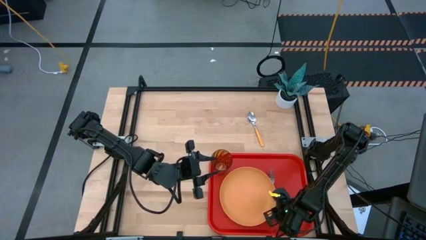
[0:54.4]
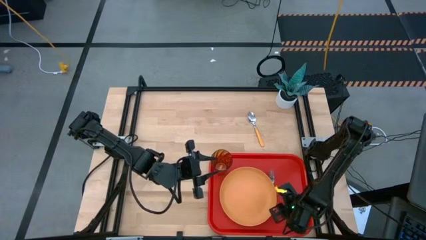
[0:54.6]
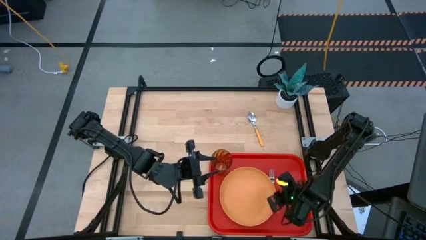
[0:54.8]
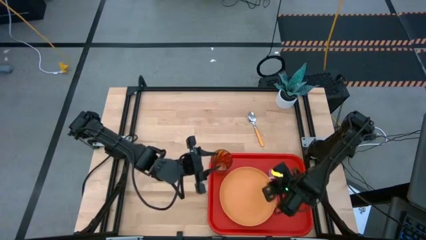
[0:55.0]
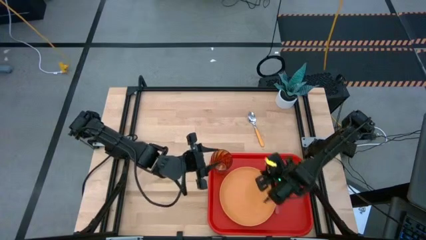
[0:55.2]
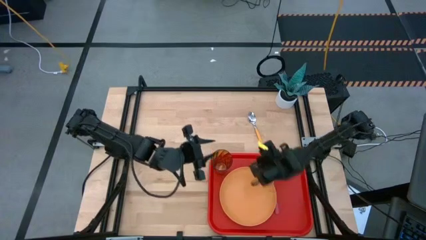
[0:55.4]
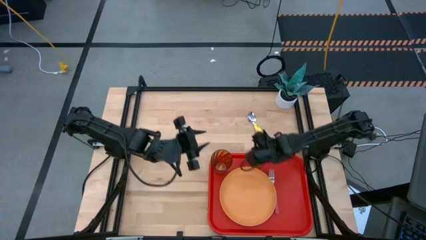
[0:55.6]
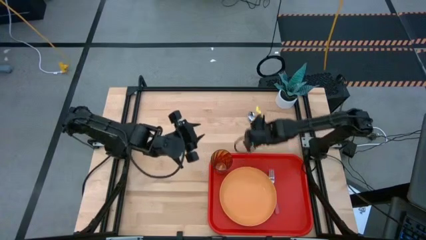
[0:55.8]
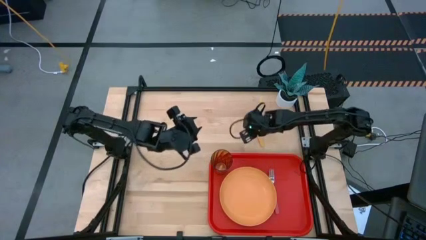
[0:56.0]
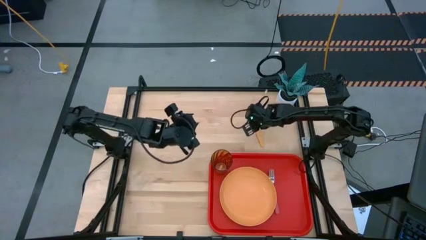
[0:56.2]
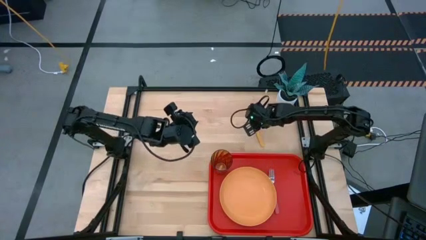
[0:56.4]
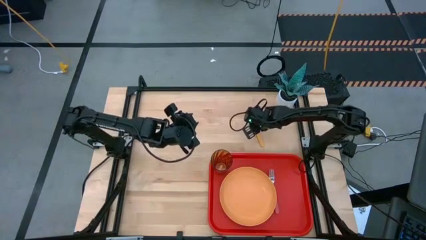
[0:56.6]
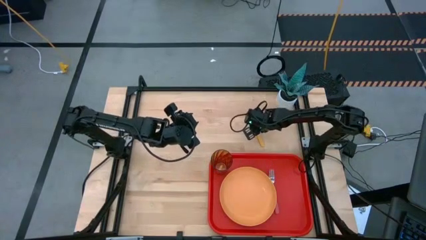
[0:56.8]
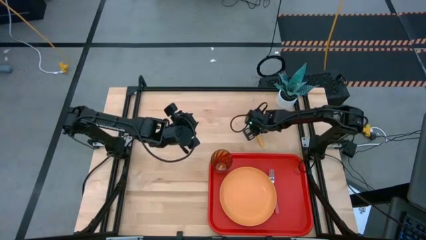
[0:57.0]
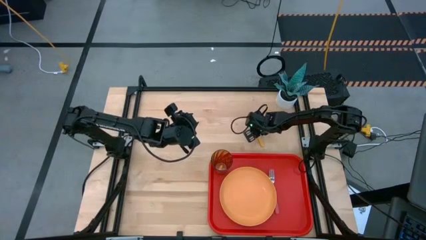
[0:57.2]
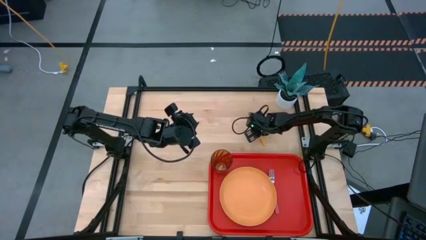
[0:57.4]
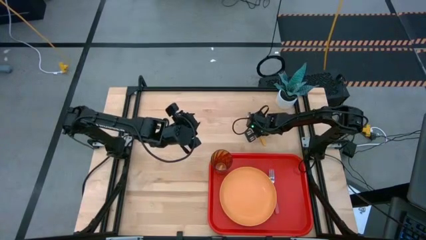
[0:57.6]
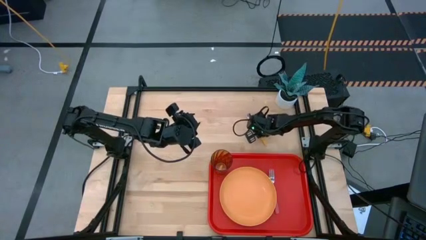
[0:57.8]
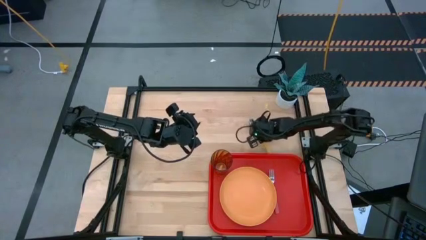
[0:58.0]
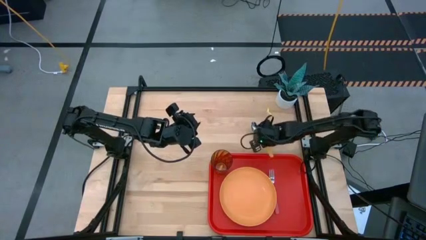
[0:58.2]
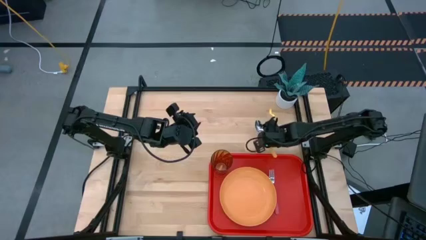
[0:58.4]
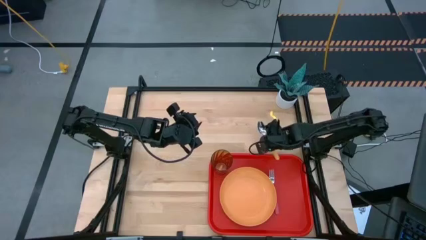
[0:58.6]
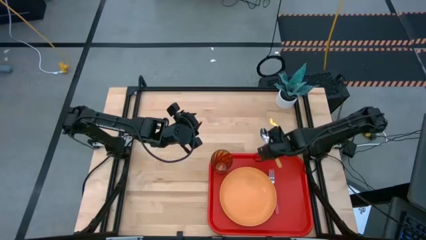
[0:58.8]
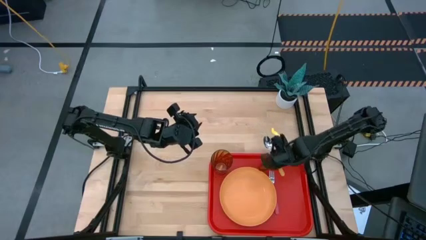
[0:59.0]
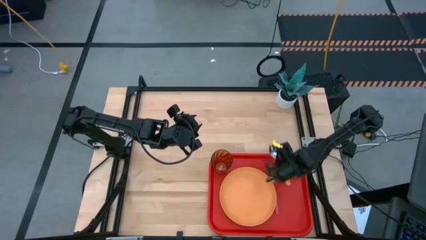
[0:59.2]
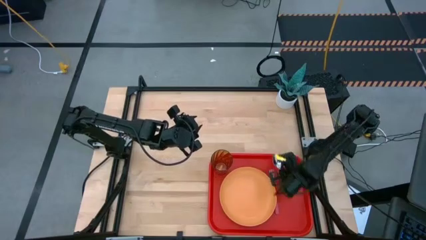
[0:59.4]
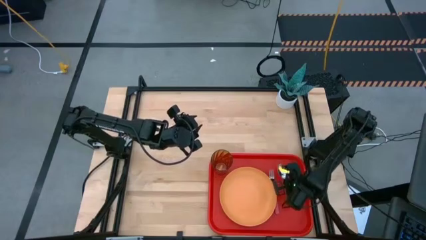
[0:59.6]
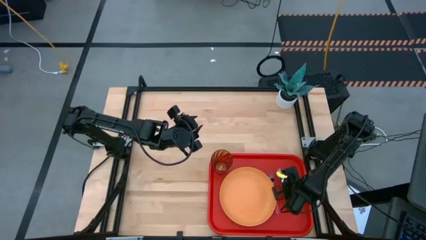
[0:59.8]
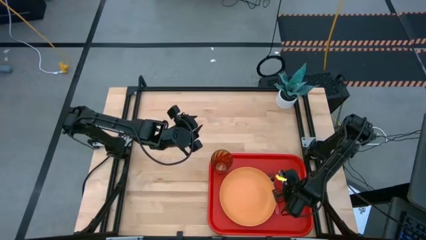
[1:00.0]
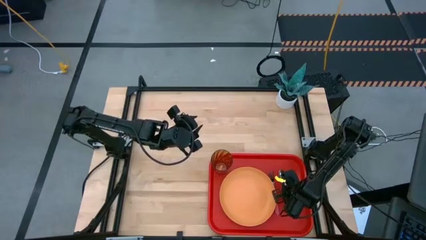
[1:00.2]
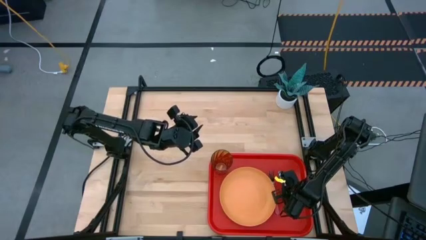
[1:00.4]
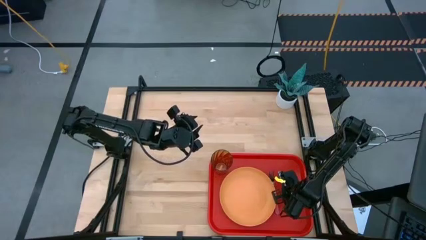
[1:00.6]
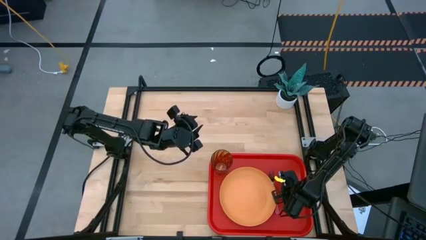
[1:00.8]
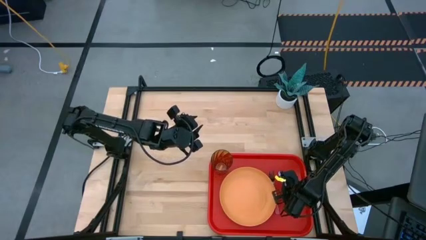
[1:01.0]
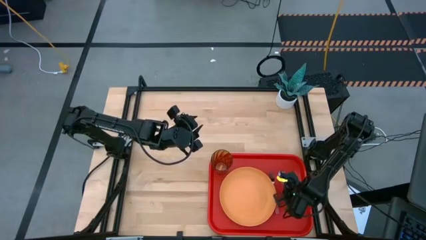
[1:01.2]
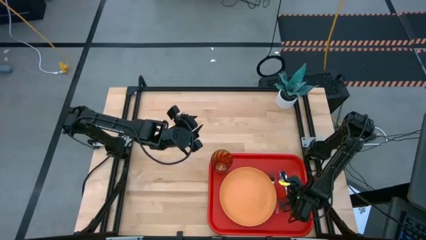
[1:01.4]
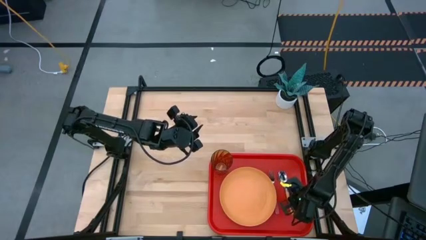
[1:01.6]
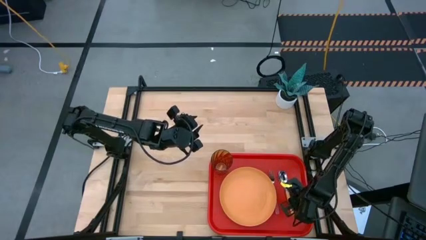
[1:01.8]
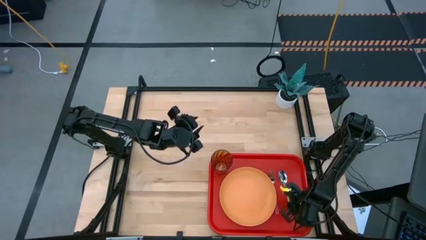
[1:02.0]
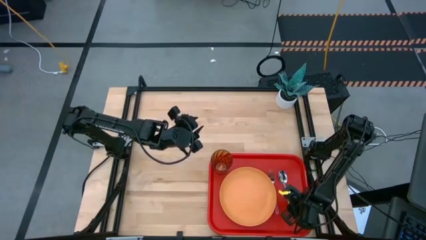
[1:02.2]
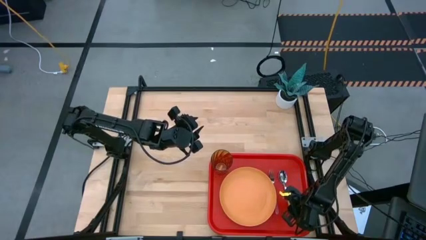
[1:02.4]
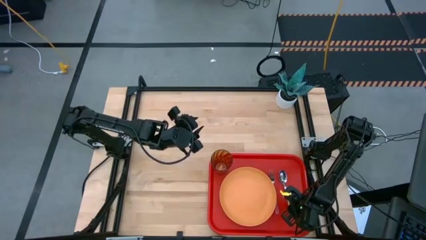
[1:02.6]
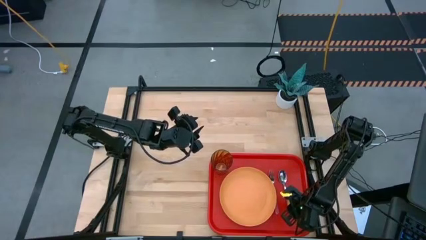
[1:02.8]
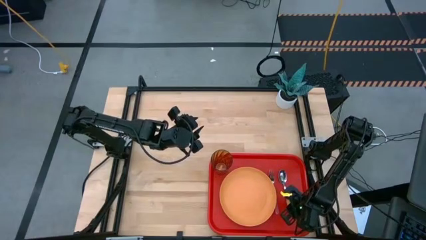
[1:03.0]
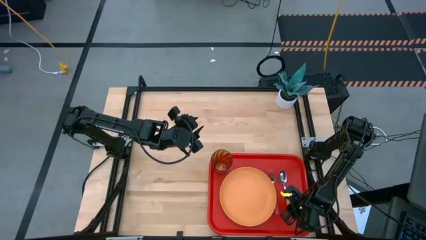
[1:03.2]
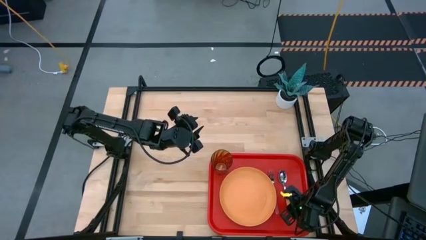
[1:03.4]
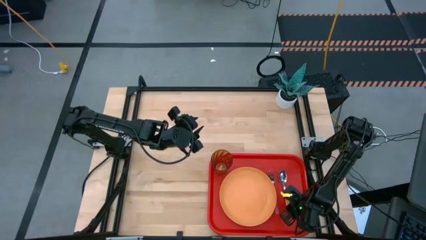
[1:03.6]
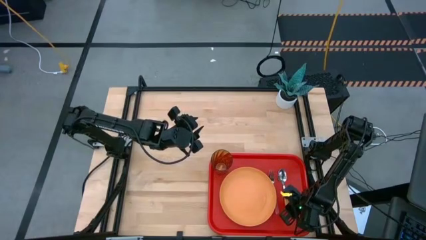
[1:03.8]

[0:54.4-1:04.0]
Task: Pick and place plate/cup/fork/spoon on tray
Put the yellow spoon to the right of the pink fork on the red tray

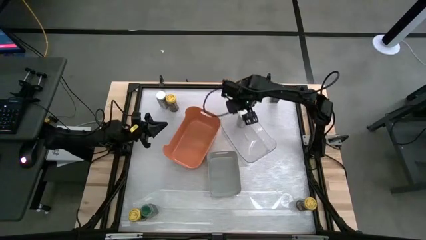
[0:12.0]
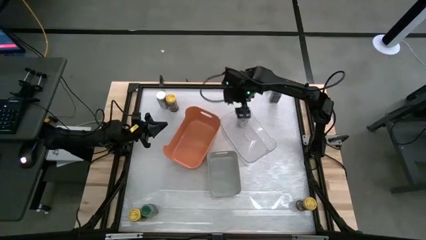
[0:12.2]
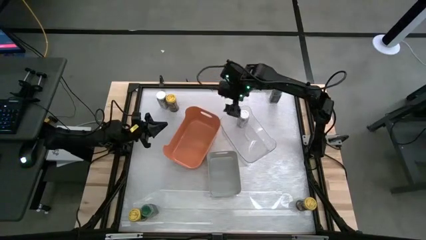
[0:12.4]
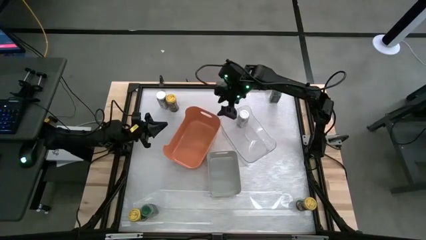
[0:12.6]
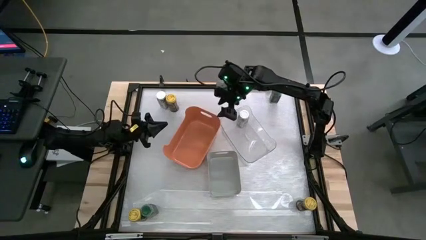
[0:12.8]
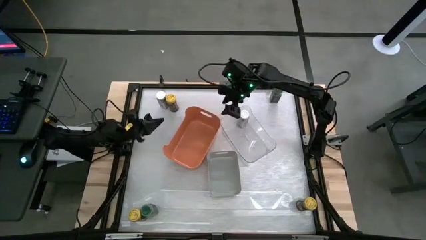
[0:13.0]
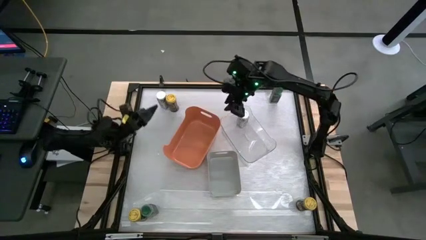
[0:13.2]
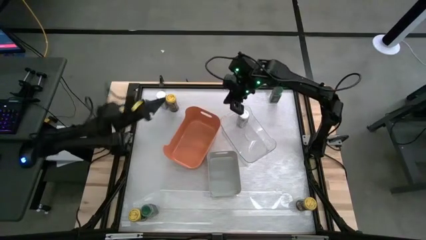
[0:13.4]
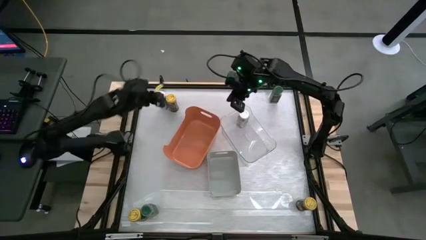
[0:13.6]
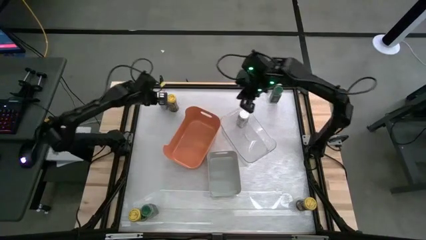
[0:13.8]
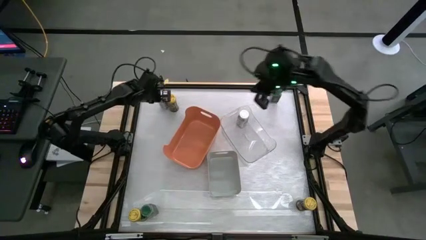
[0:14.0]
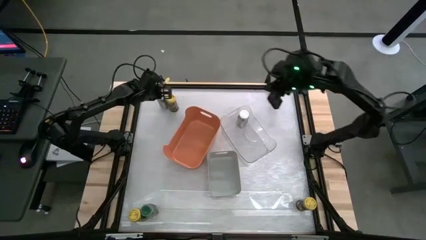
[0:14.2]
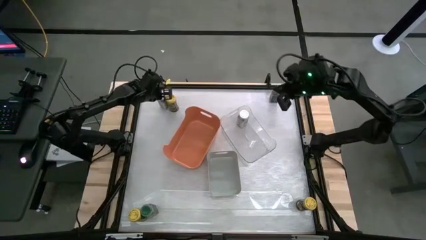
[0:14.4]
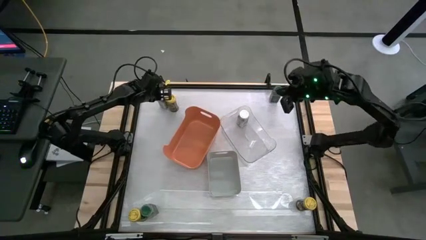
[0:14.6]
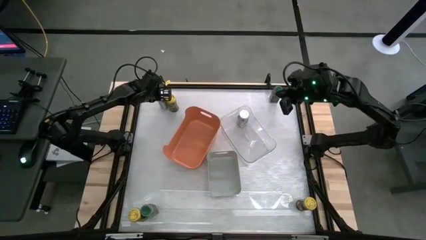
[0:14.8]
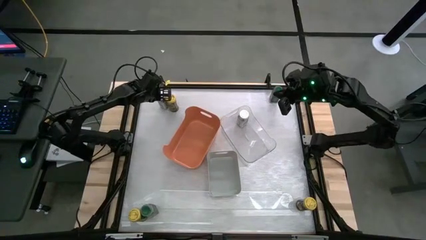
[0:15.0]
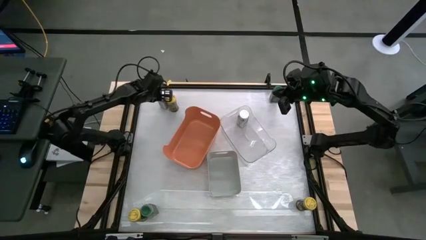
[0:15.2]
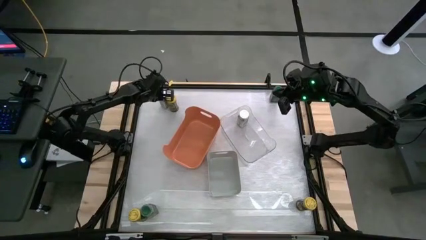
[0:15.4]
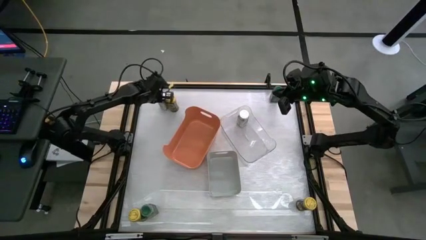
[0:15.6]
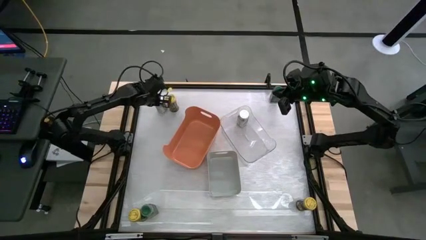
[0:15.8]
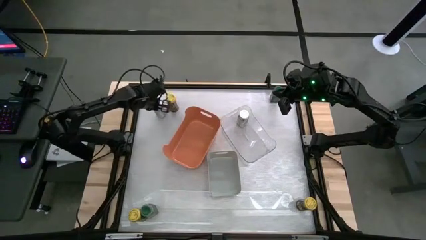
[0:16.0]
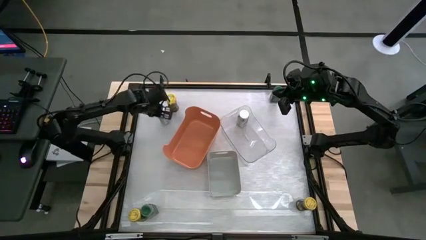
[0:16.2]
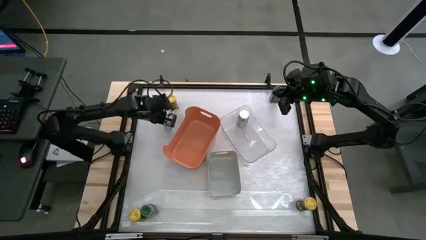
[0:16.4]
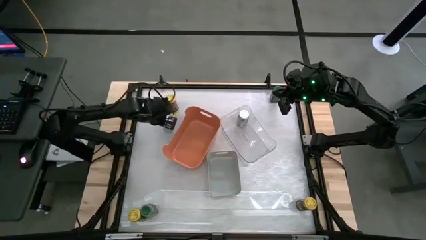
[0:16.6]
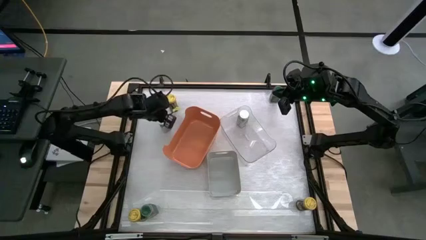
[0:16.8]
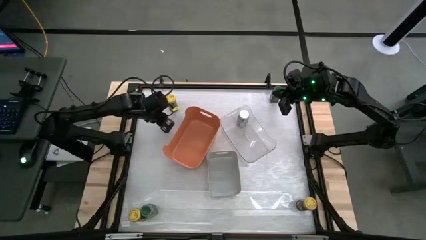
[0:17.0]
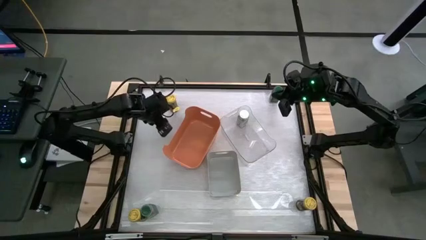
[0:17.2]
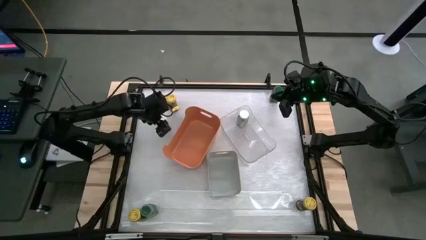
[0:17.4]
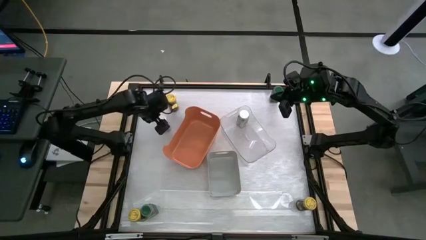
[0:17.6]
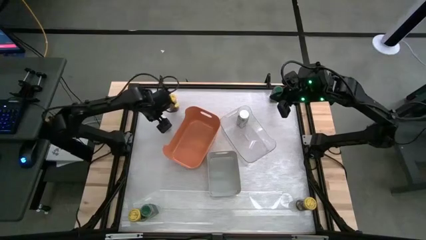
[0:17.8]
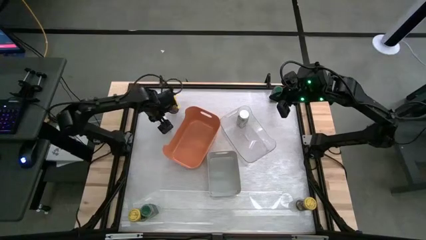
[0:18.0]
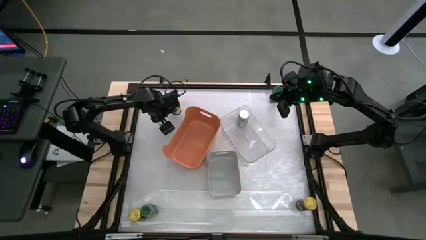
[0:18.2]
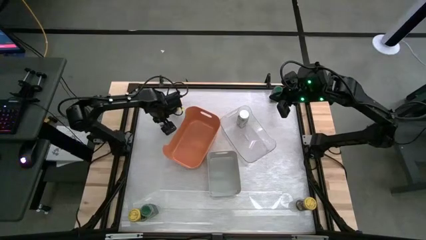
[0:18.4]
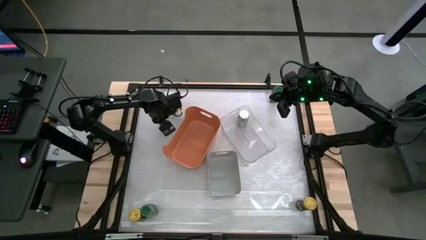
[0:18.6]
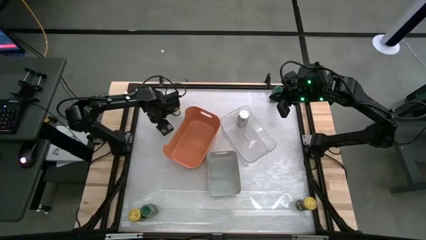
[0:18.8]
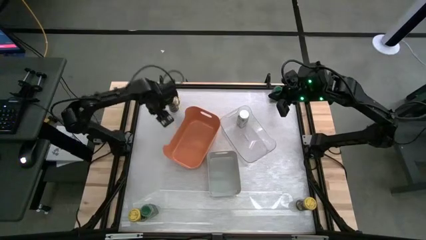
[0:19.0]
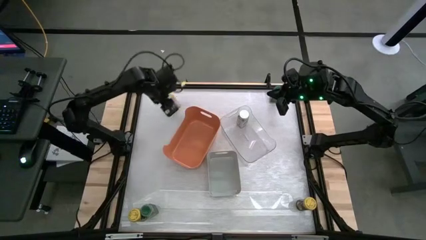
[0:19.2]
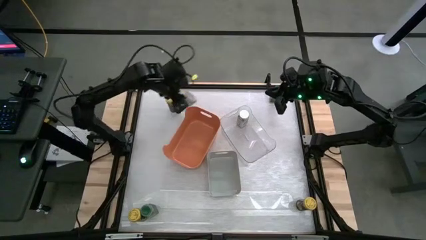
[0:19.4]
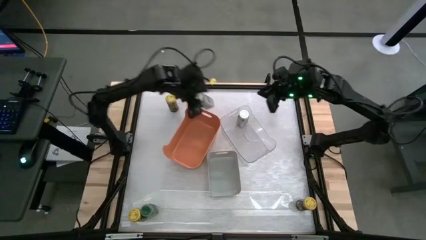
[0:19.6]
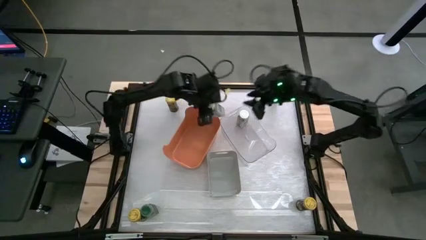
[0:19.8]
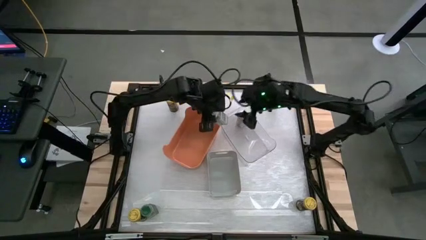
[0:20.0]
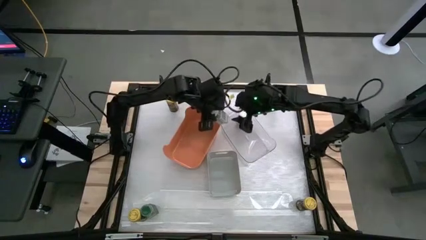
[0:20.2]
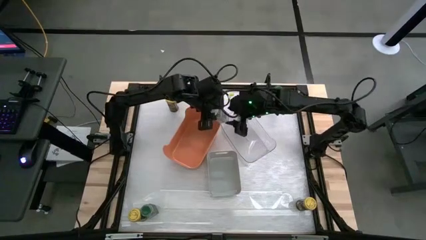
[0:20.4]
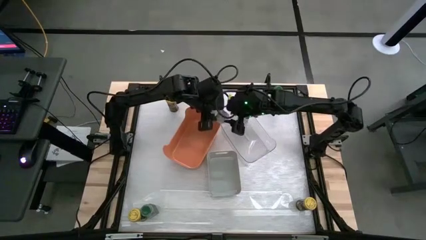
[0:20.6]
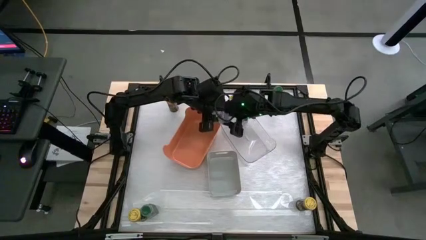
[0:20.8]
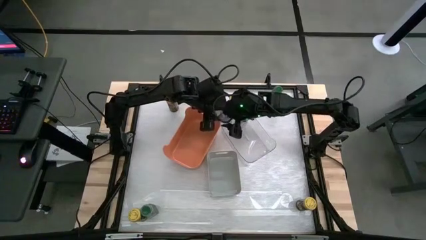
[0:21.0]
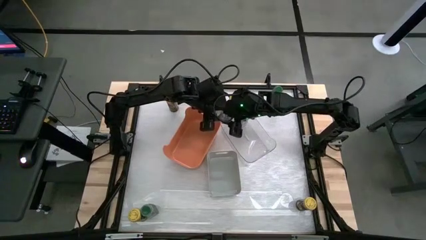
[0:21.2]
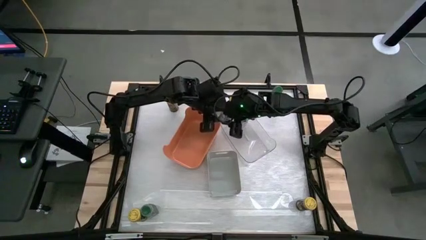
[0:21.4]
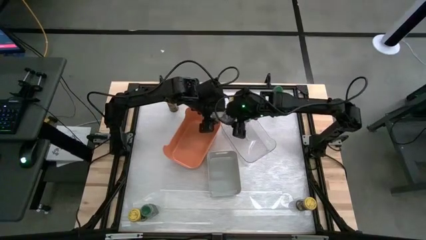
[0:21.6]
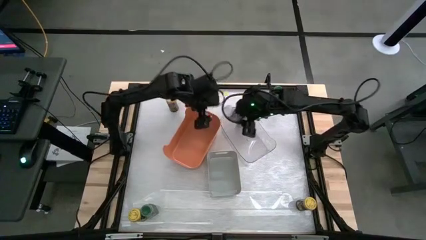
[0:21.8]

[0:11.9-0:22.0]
Task: Sort spices by type
Put the white seasoning bottle into the transparent bin
